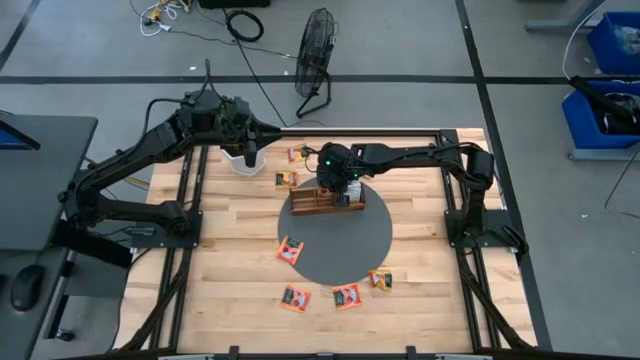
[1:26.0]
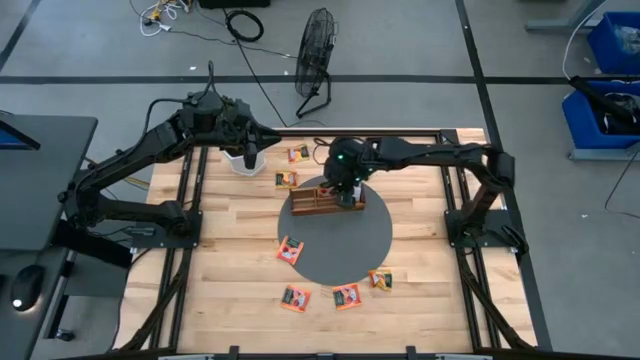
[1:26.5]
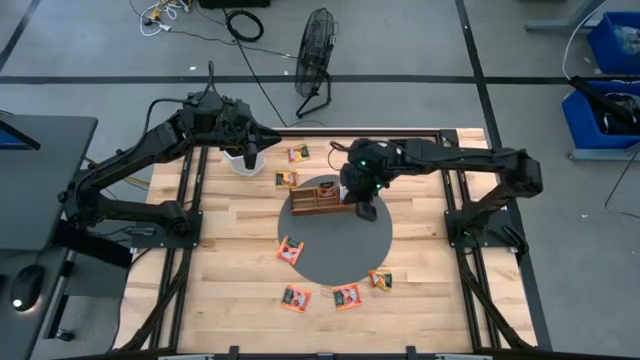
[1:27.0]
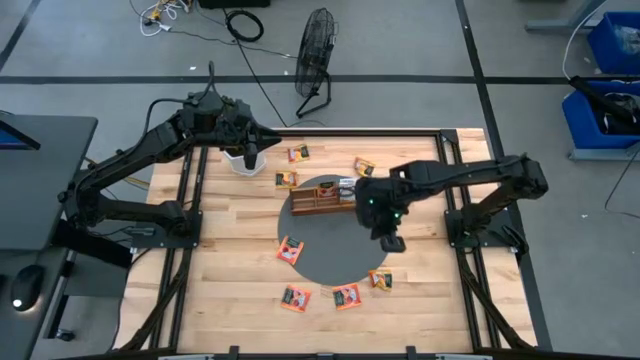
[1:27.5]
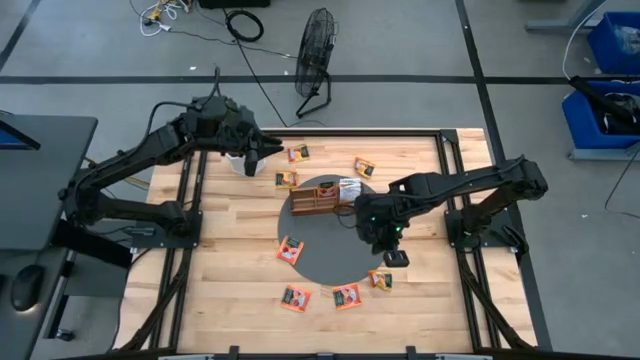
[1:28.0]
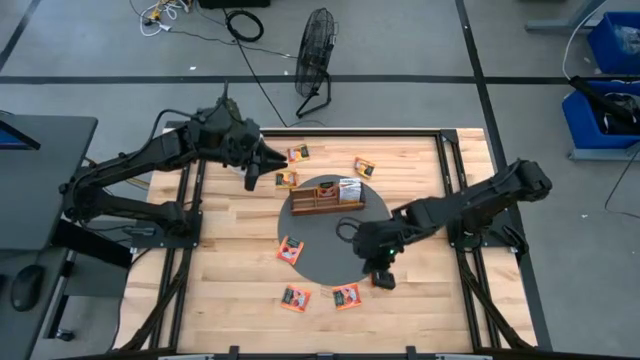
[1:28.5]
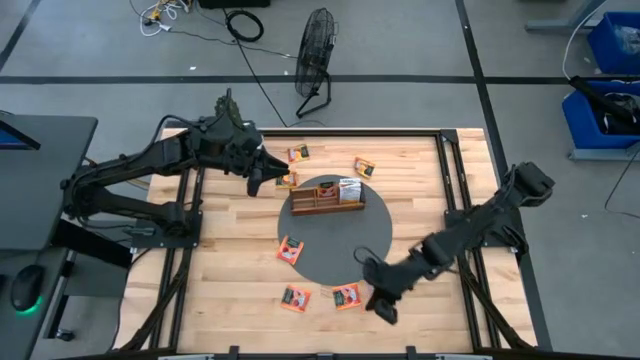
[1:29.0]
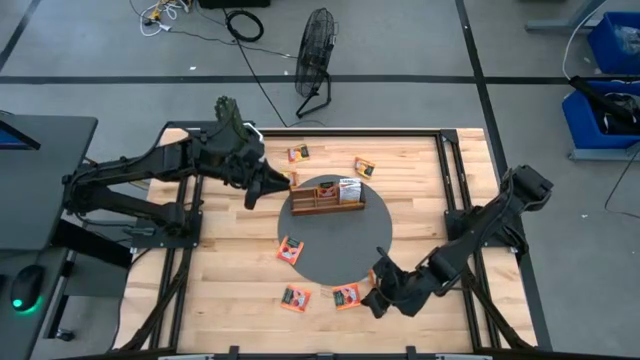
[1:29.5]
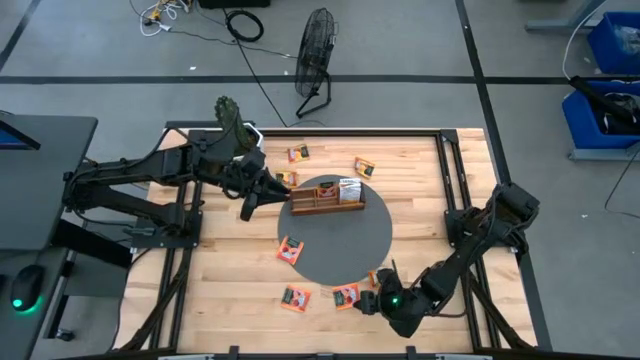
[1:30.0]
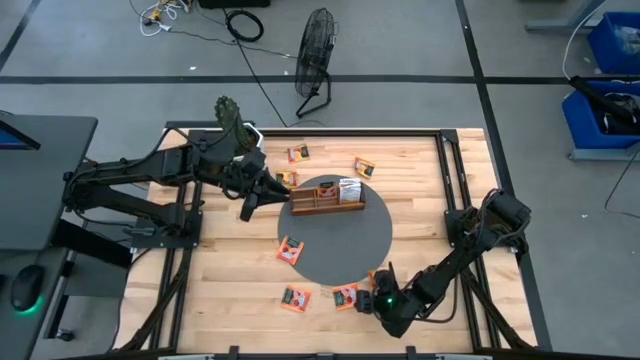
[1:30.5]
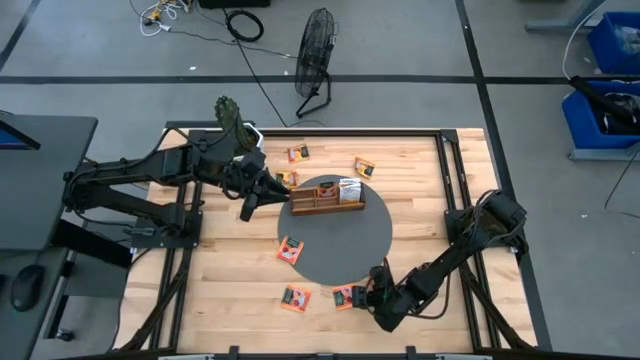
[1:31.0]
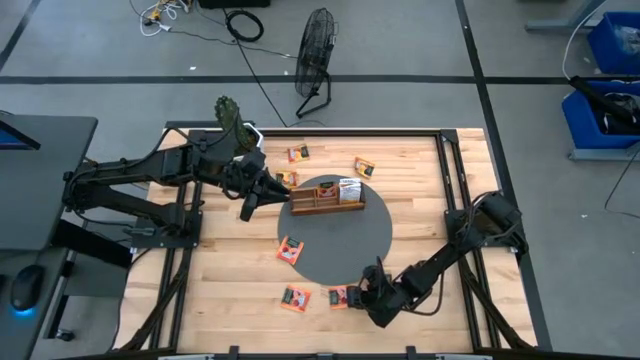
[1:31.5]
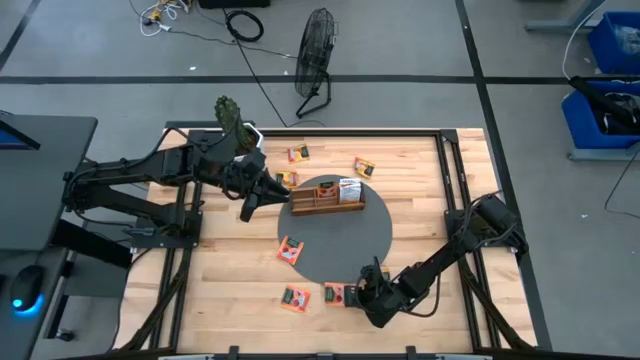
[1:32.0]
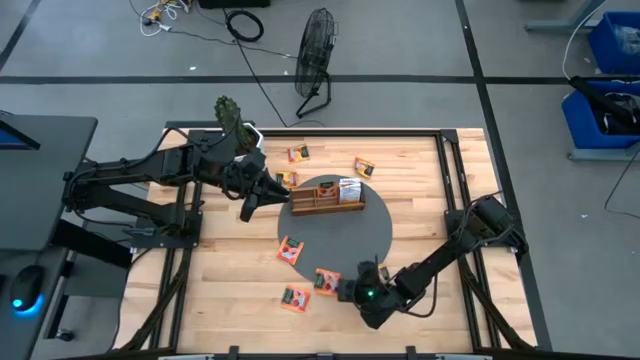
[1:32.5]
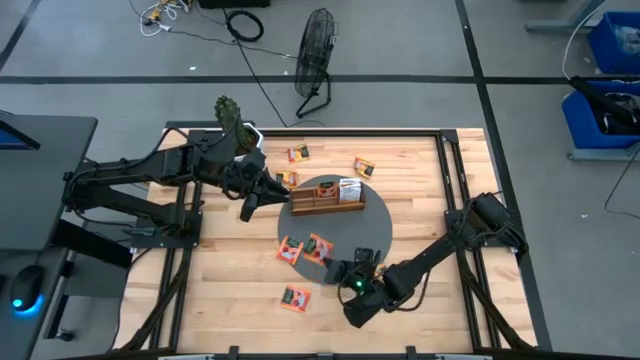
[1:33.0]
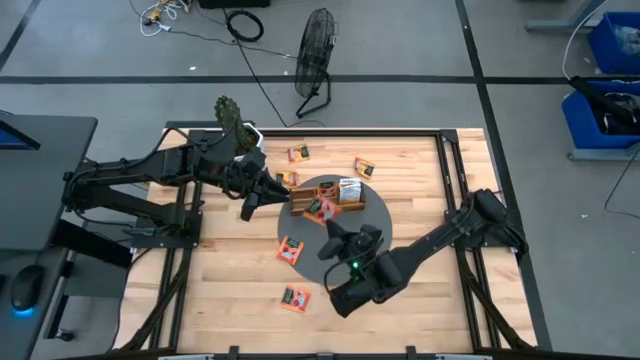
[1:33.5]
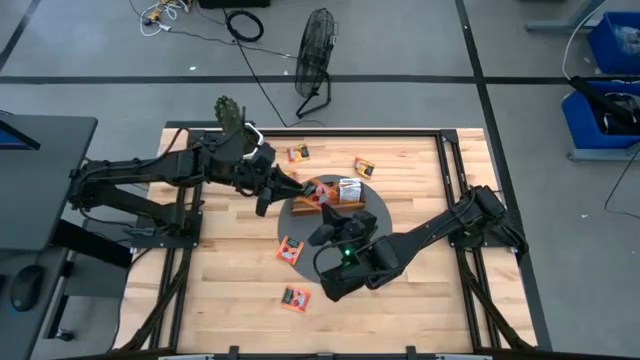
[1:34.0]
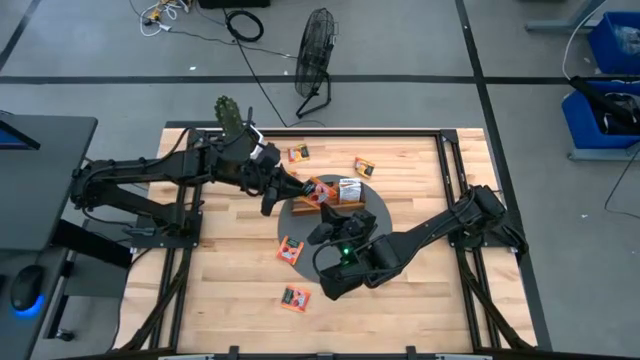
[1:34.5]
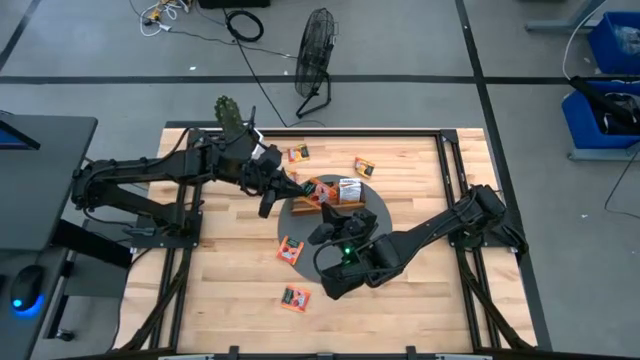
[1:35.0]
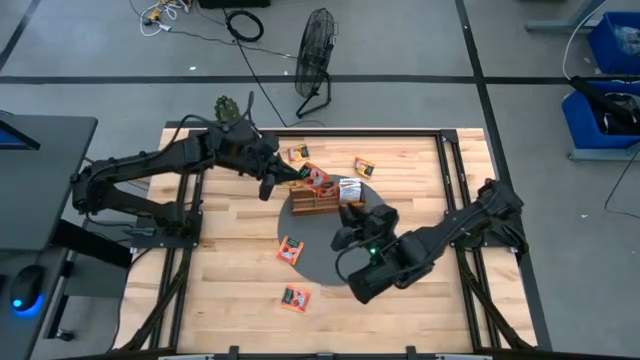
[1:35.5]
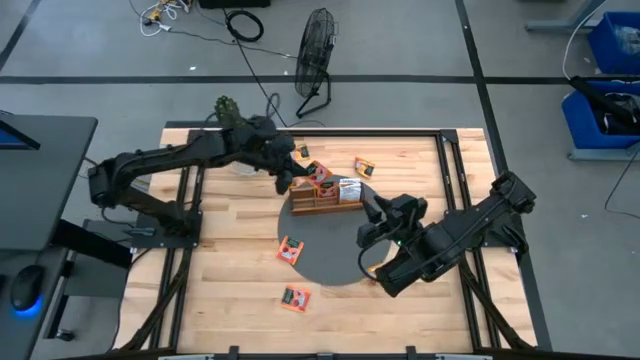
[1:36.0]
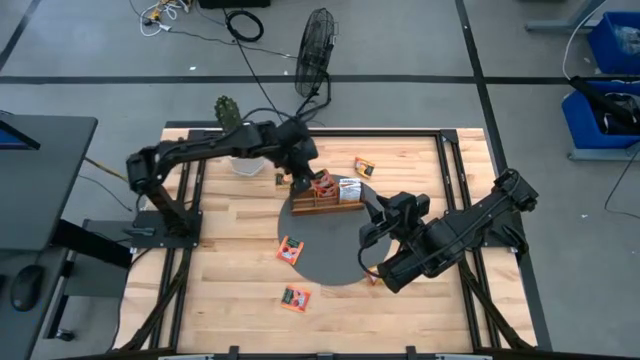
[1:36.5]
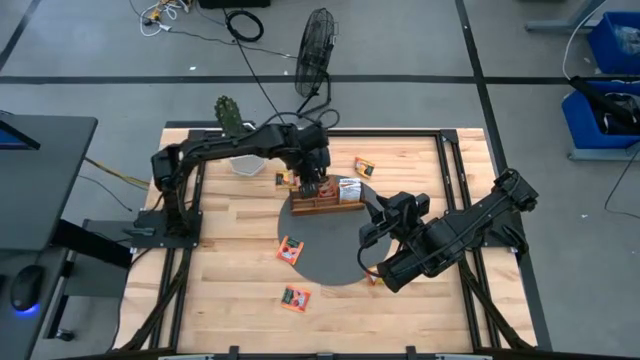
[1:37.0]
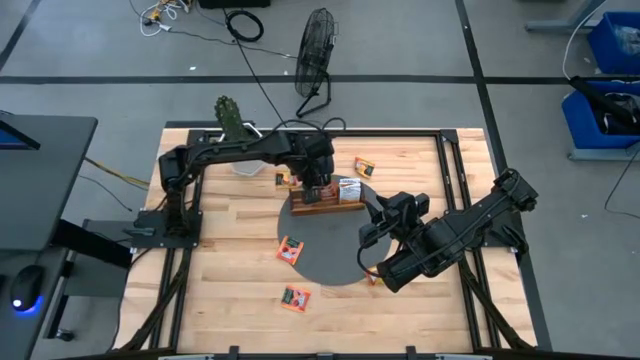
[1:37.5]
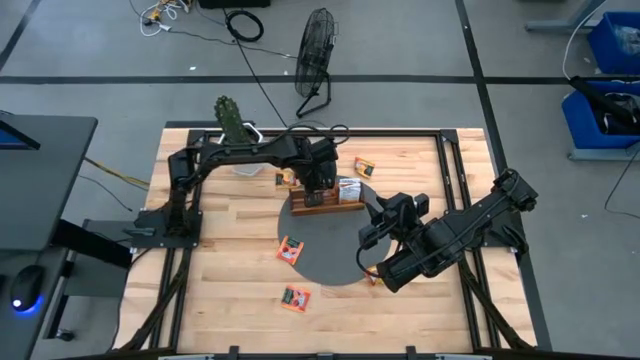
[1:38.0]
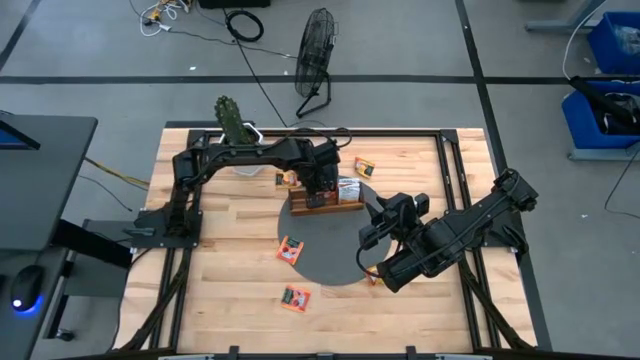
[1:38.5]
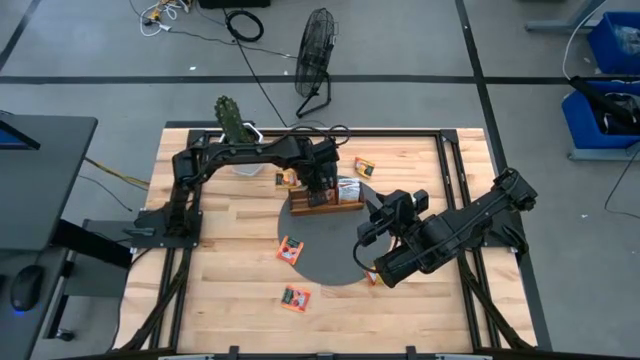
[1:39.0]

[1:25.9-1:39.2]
Task: Pick & Place Tea
Put the pink tea bag into the middle section of the wooden organizer

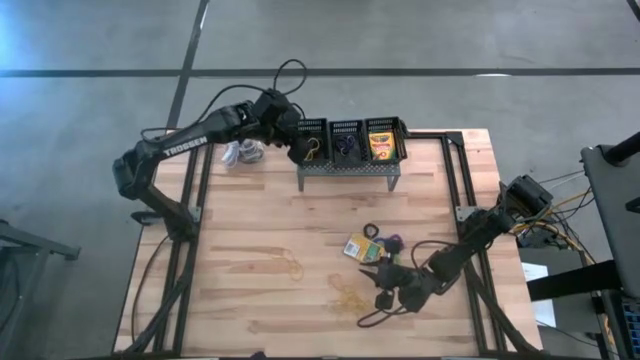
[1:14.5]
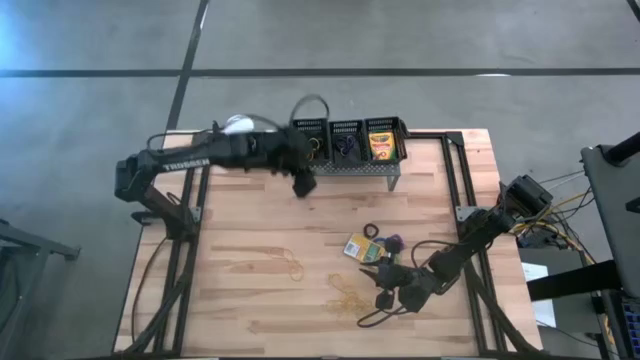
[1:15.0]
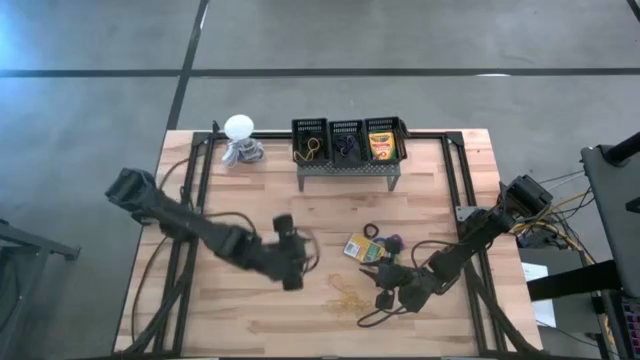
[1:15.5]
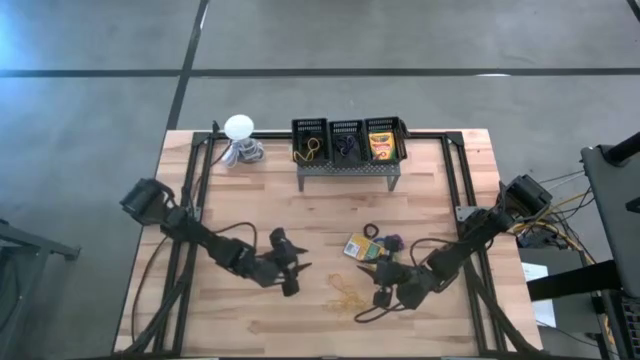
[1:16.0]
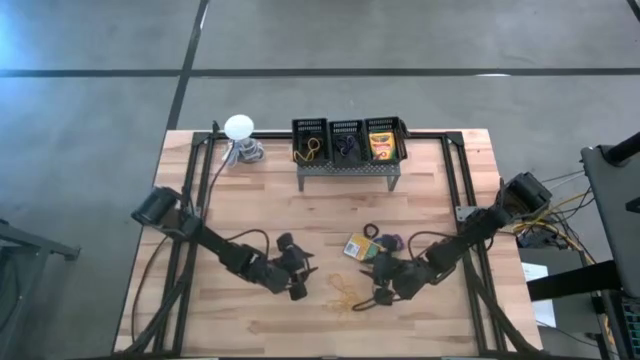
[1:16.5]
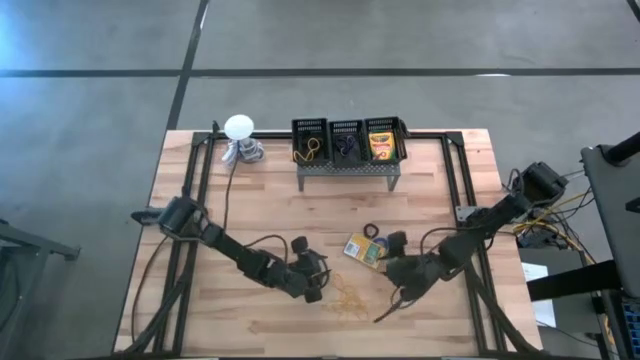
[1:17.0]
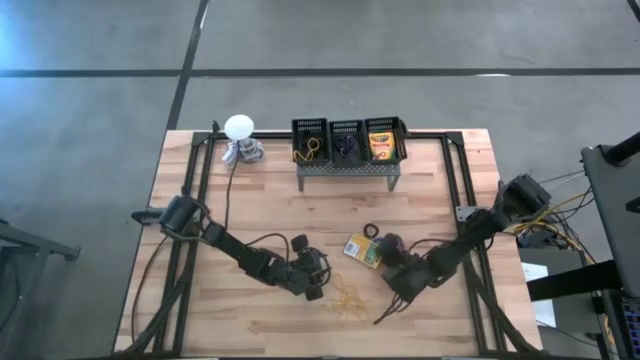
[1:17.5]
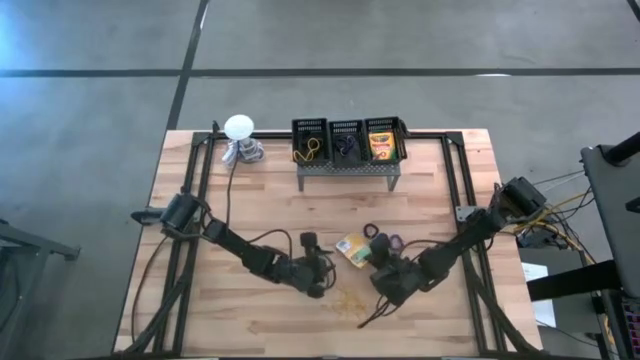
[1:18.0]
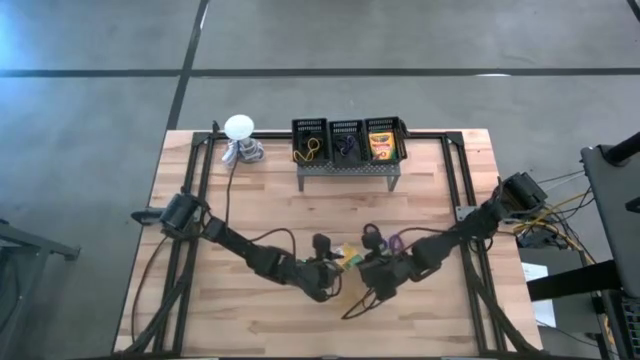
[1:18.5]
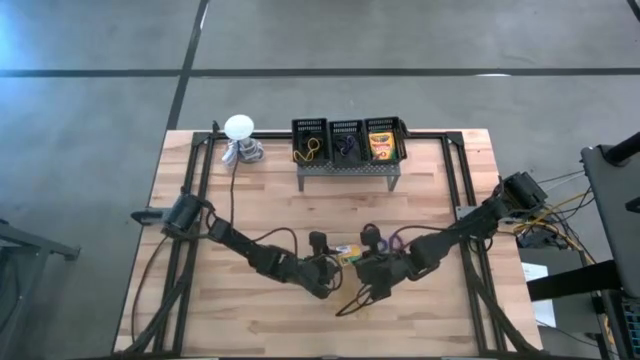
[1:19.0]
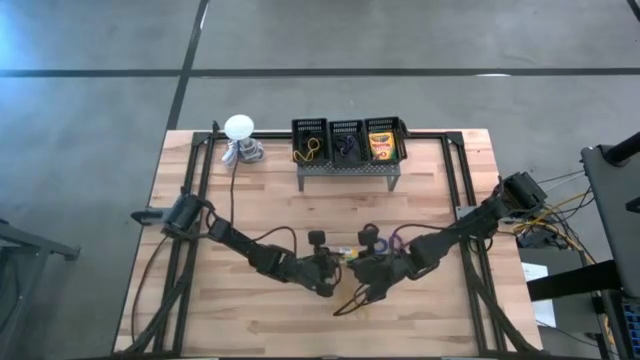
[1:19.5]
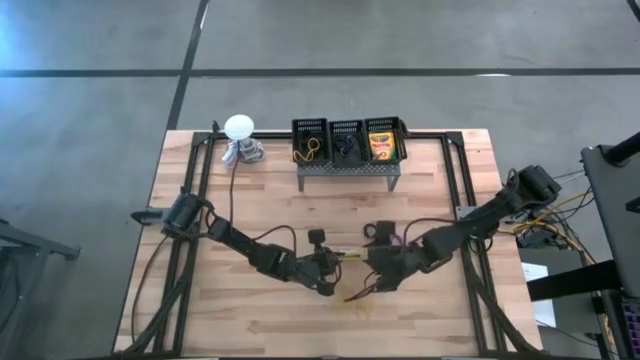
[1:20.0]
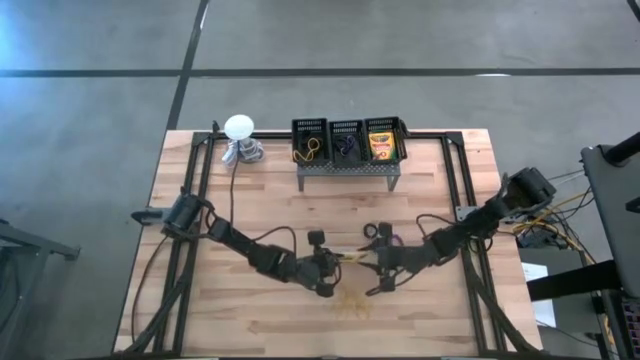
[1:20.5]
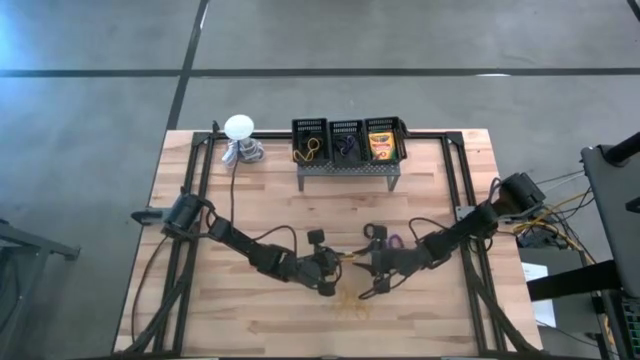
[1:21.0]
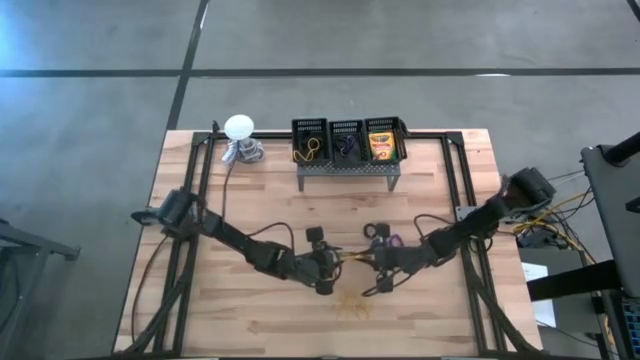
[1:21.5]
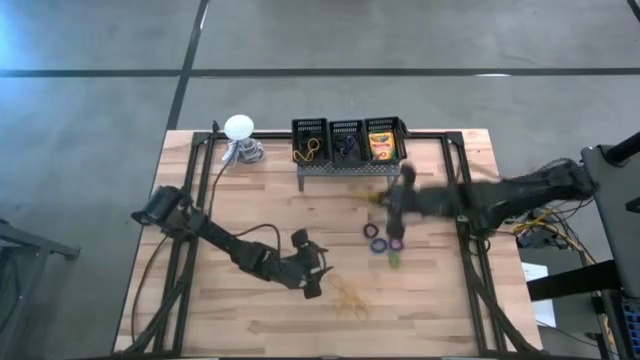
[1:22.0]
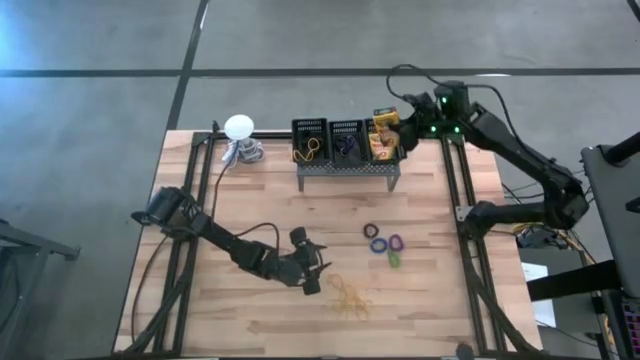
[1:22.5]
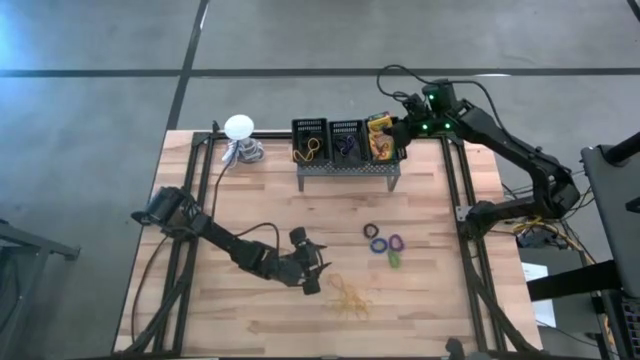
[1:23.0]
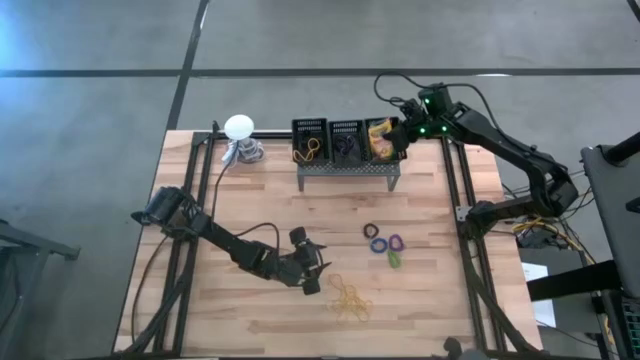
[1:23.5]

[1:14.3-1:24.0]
Task: Pick & Place Office Desk Supplies
Put the yellow crayon box into the right black bin on the shelf

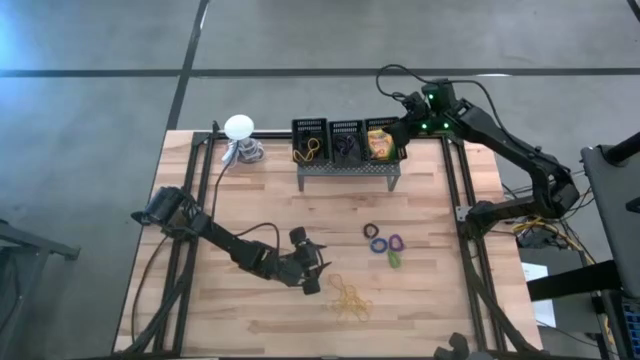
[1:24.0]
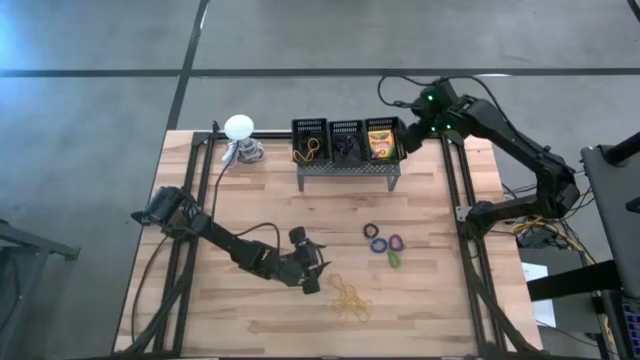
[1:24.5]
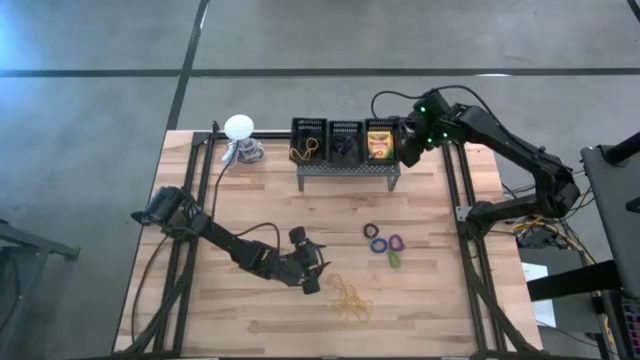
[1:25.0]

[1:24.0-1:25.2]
Adjust the right black bin on the shelf
